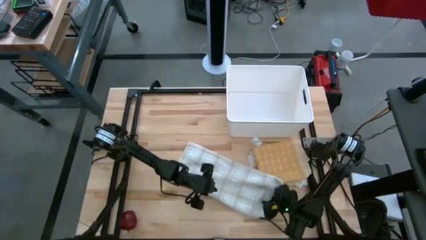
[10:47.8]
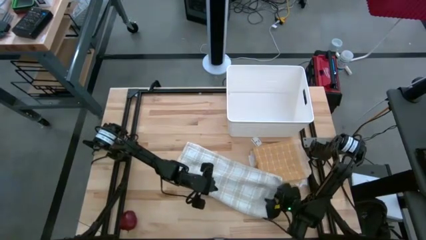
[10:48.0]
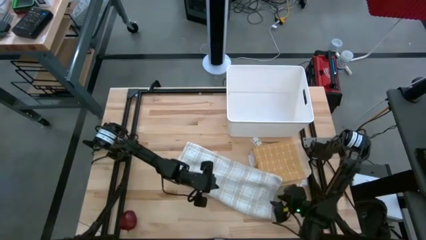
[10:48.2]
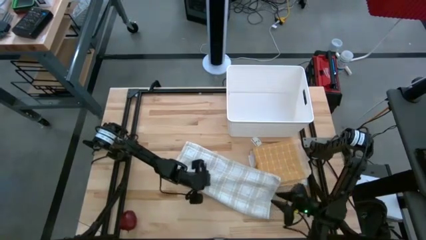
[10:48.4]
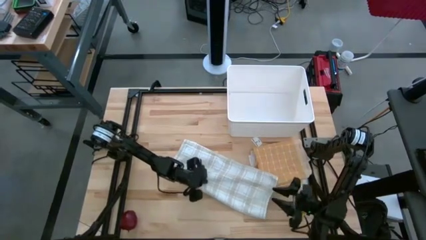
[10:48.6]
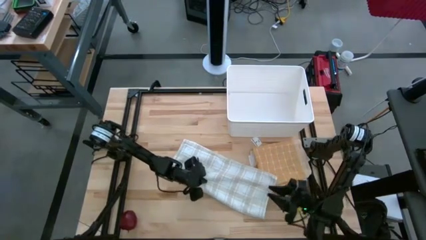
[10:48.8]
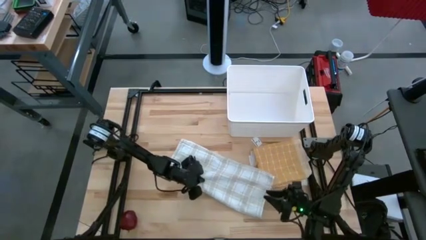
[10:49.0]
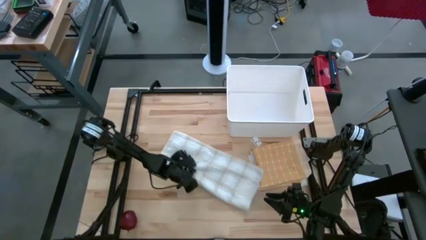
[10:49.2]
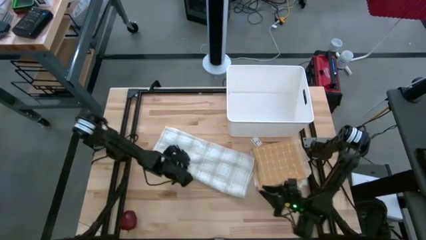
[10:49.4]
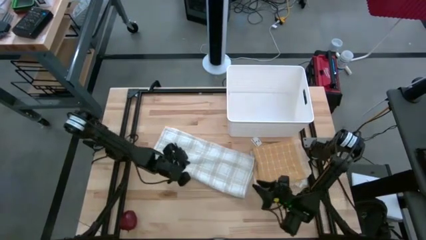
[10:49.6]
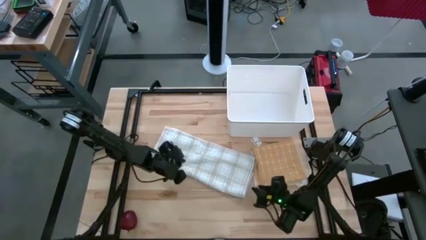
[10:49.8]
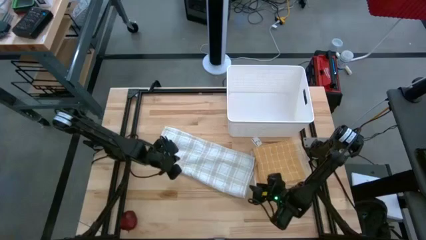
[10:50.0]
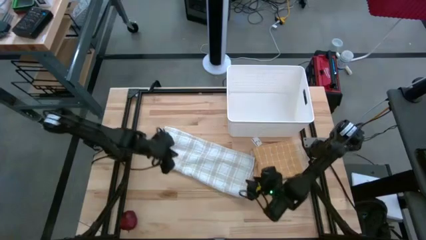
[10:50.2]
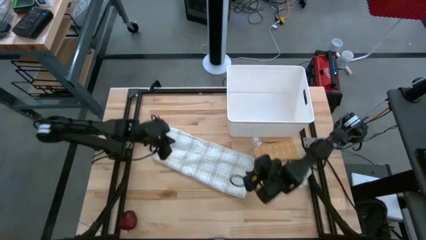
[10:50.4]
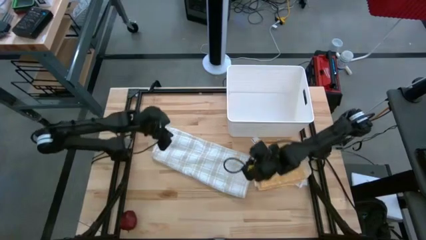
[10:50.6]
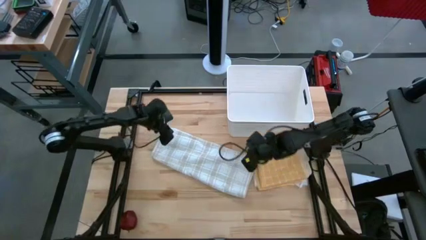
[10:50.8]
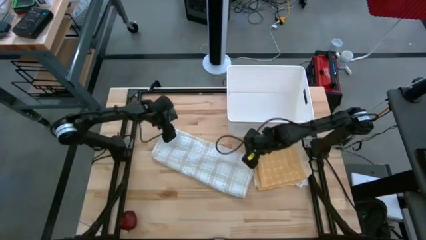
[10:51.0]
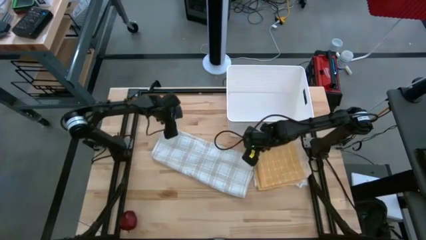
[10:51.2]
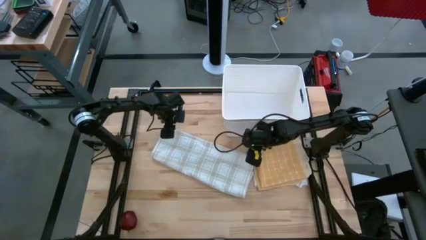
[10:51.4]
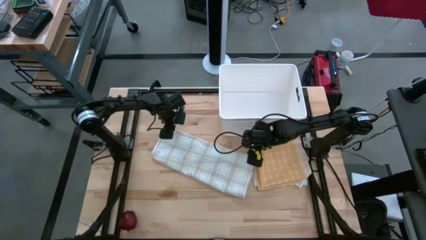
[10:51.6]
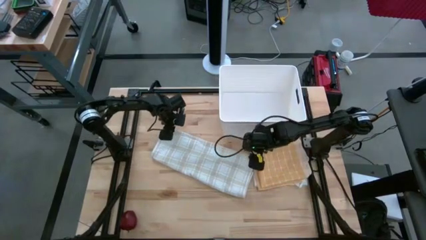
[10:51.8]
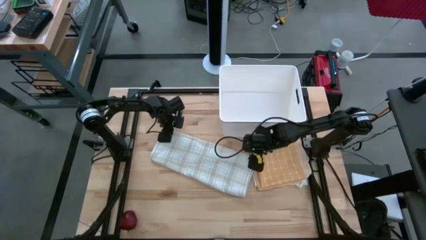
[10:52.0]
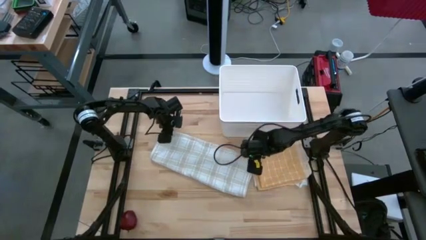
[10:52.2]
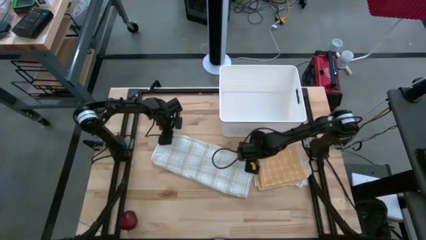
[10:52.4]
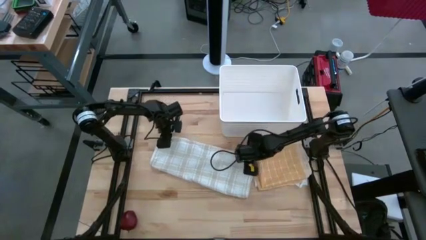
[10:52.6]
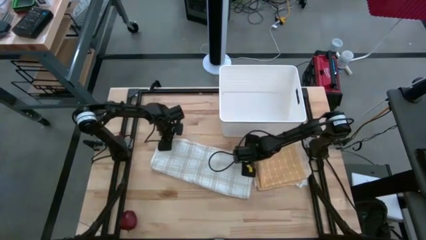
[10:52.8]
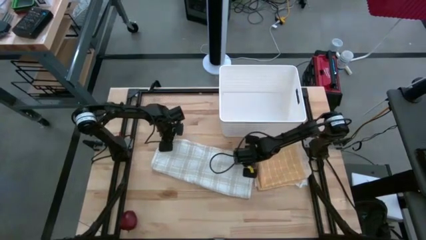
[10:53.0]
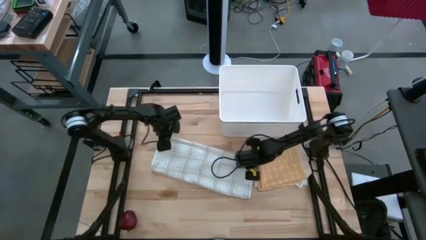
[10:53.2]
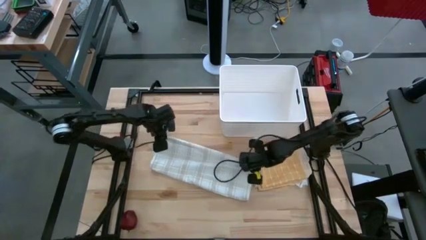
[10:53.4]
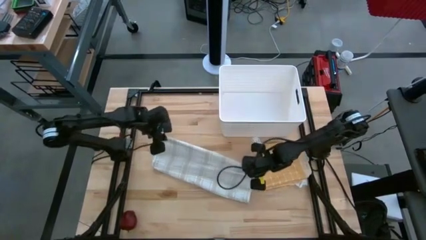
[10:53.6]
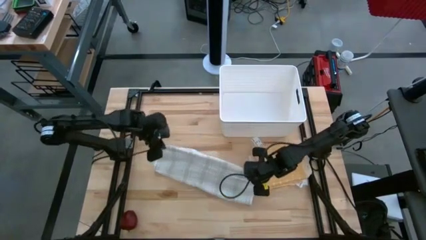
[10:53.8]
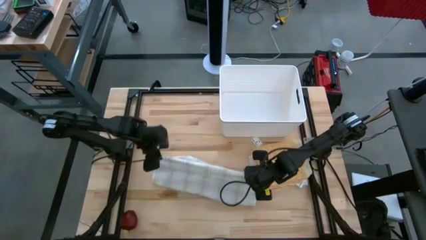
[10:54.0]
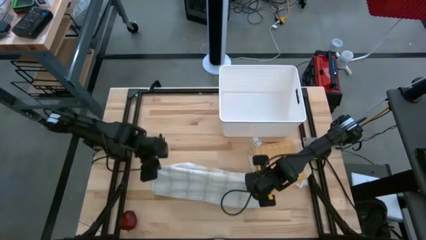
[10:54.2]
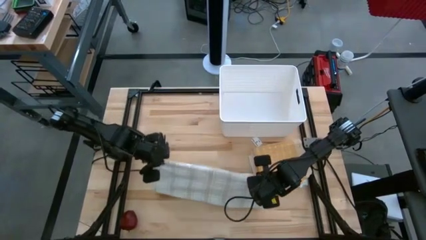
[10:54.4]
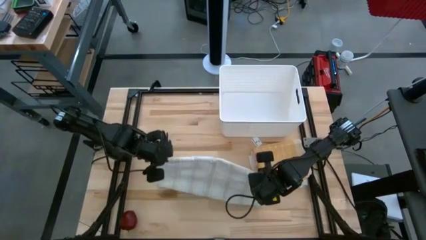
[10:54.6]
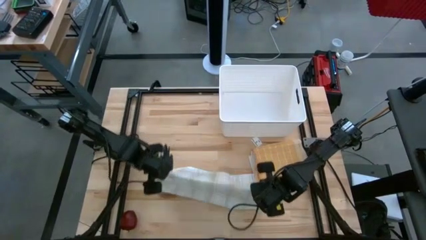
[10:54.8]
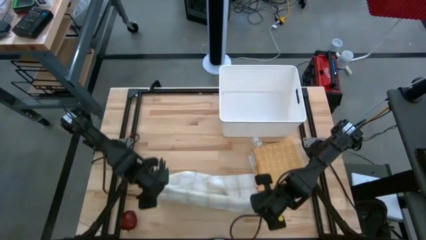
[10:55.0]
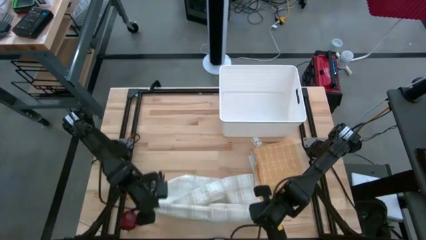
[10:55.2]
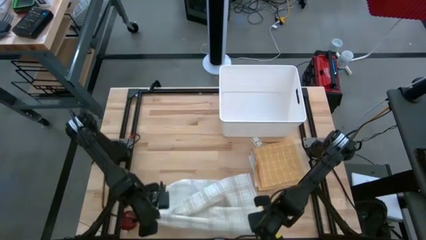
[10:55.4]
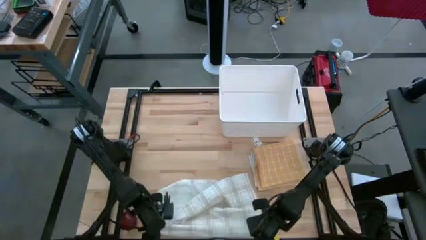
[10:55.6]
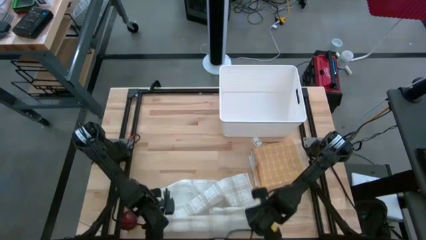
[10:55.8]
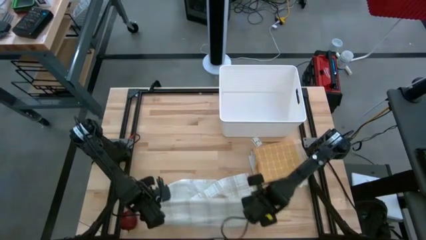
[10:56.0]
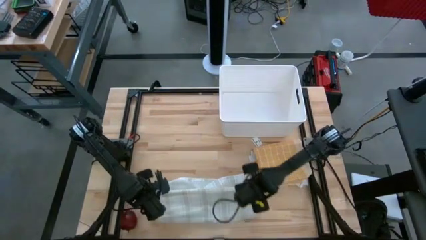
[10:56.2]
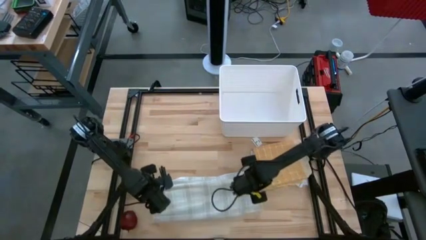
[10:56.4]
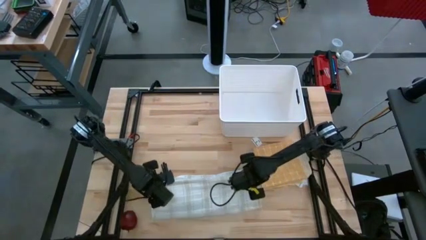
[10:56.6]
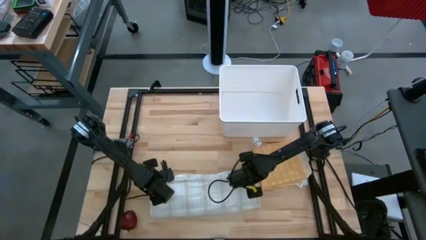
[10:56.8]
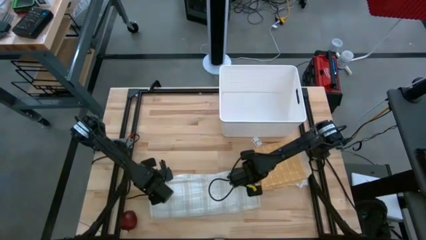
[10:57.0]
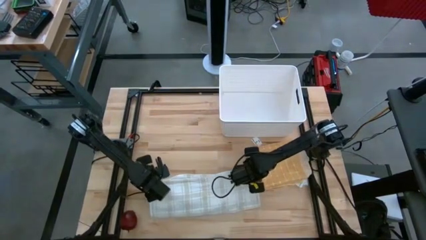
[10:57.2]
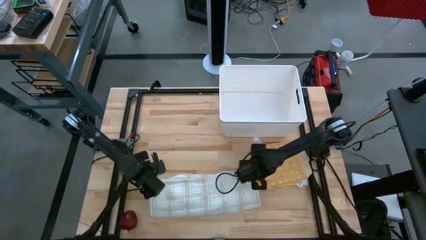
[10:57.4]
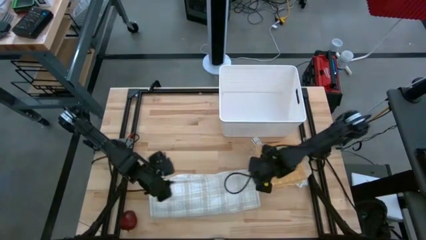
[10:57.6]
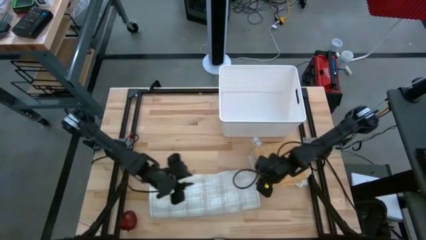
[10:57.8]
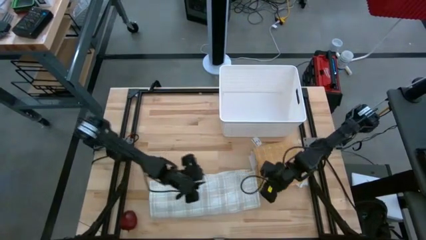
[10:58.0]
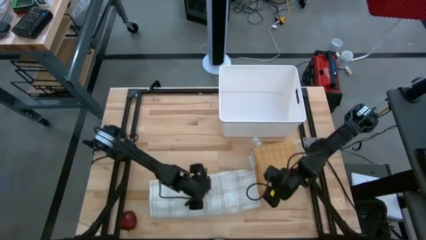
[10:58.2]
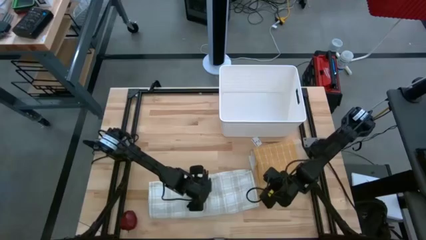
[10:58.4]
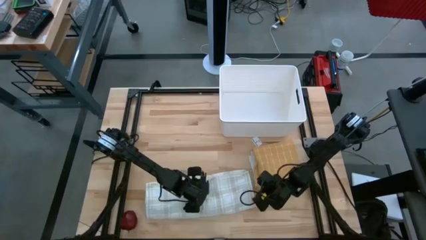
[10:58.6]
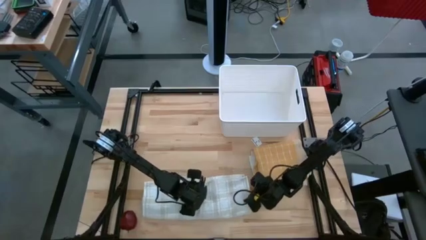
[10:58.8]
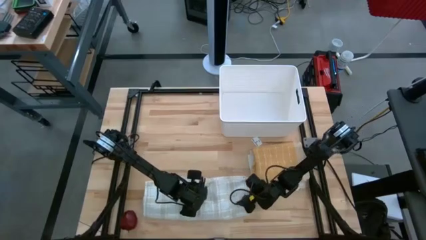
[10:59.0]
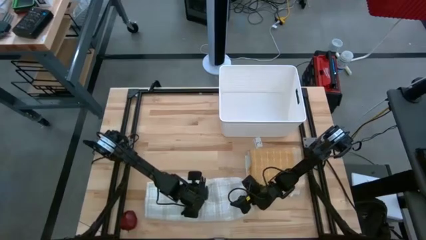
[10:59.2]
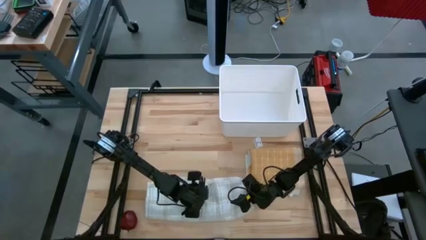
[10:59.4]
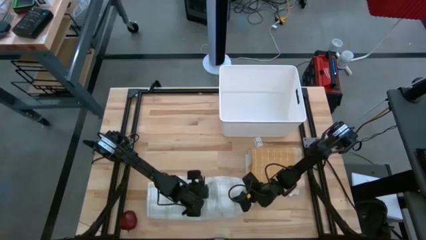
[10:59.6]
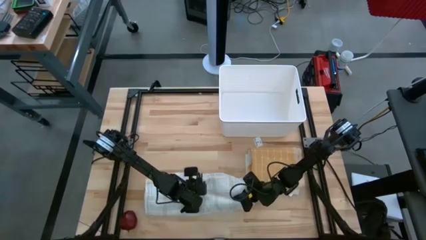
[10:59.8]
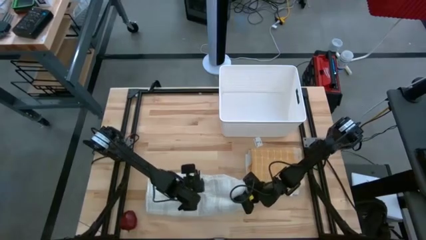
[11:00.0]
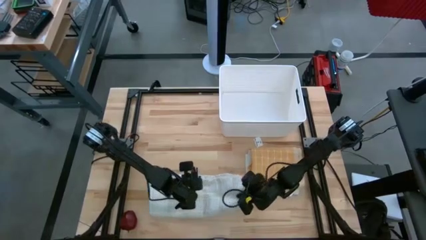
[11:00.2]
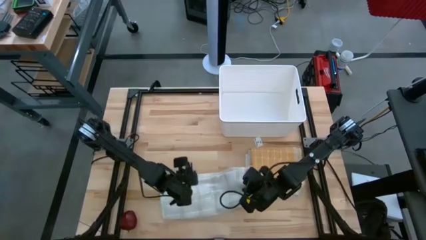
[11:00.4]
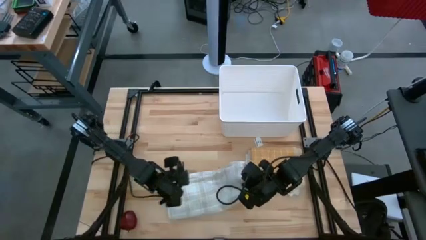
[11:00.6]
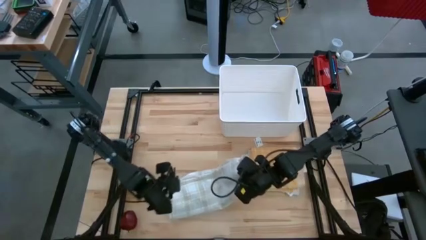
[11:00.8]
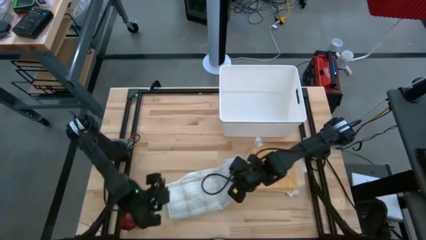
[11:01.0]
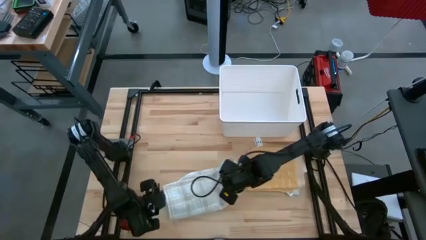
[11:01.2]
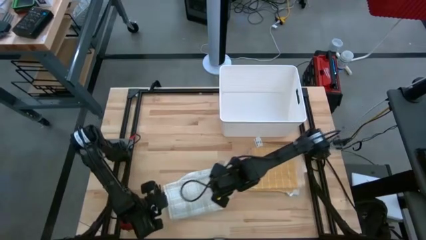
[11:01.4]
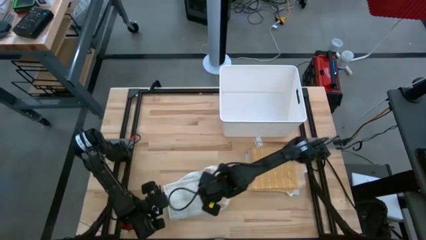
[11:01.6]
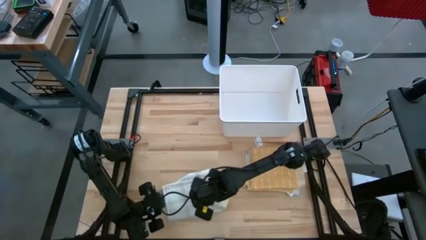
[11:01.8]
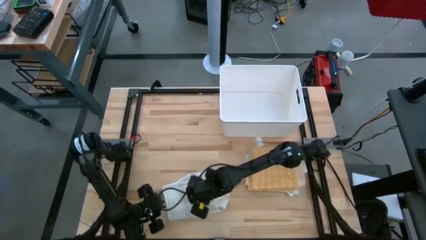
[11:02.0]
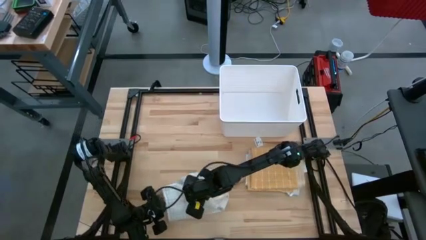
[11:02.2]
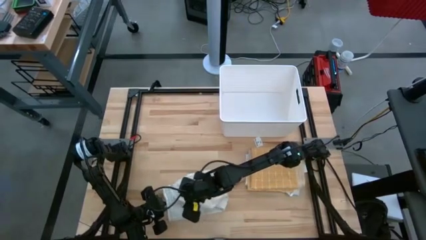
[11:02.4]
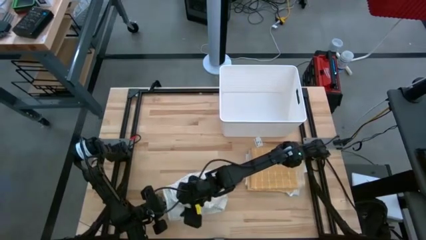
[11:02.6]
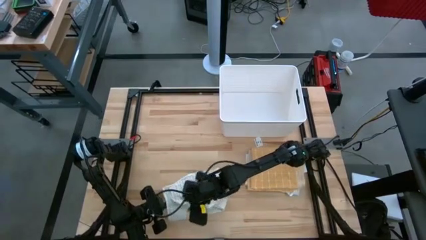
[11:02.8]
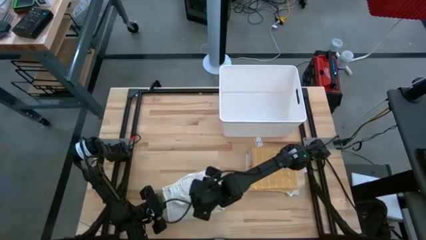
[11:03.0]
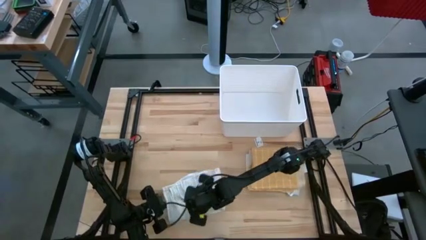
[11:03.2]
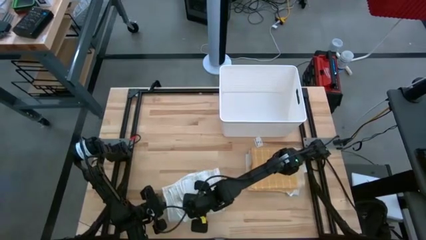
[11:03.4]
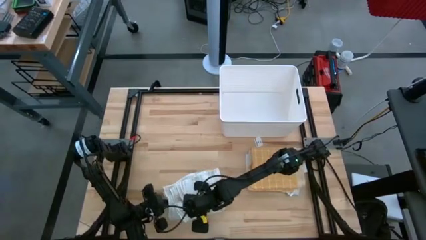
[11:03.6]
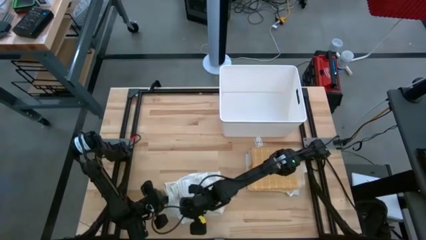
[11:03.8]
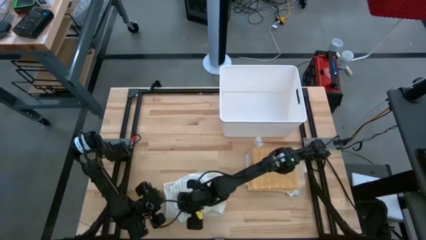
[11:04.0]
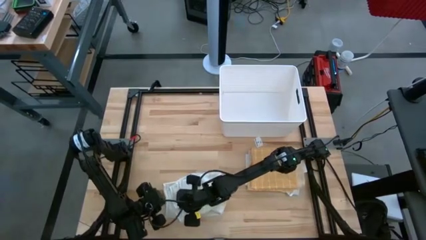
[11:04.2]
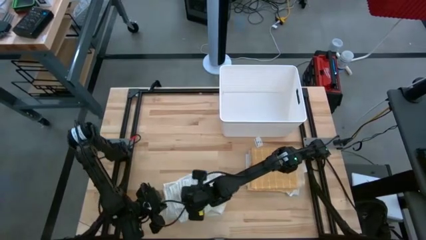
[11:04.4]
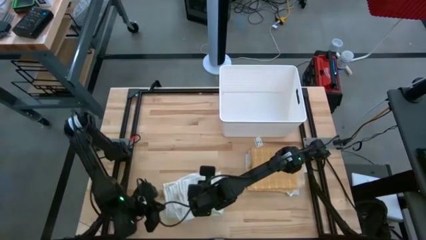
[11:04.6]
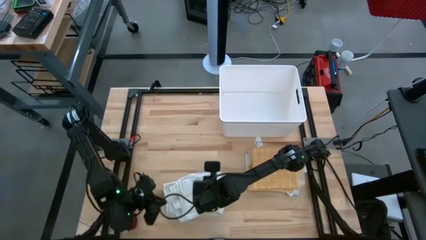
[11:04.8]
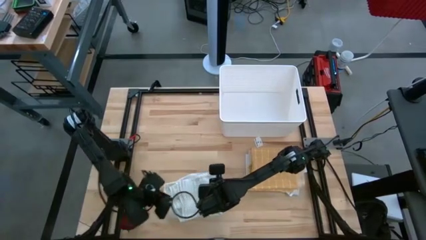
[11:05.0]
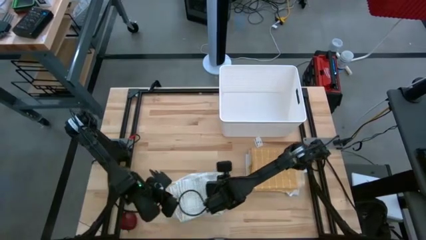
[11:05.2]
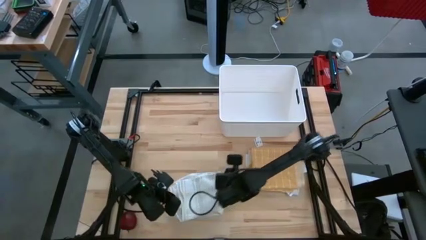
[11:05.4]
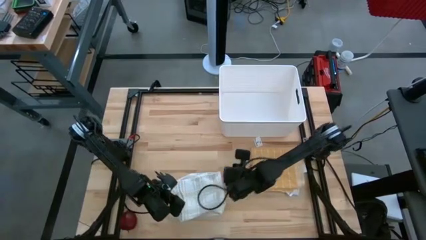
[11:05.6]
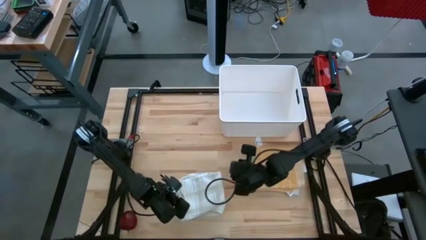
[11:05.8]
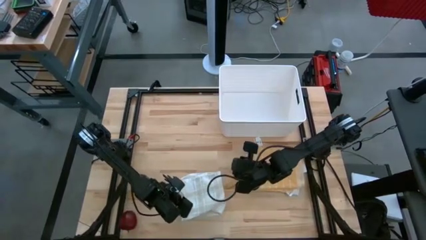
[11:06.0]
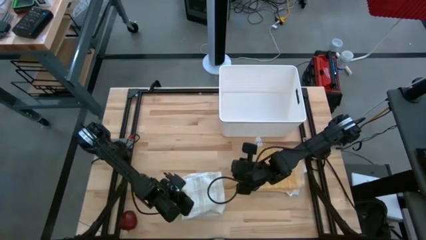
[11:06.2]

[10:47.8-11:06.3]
Task: Fold towel
Fold the white checkered towel
